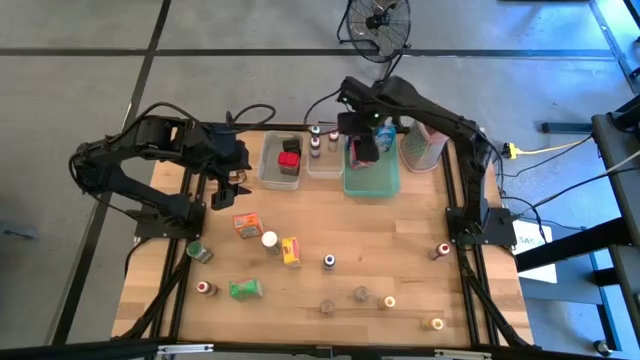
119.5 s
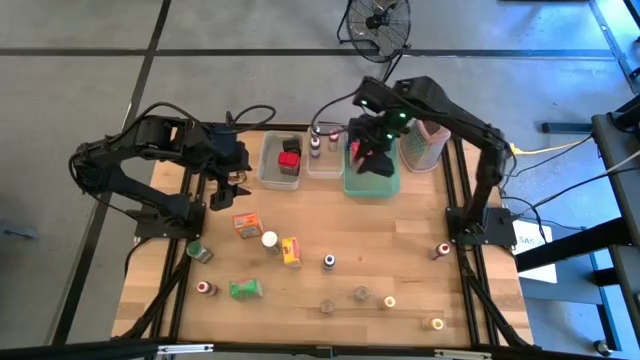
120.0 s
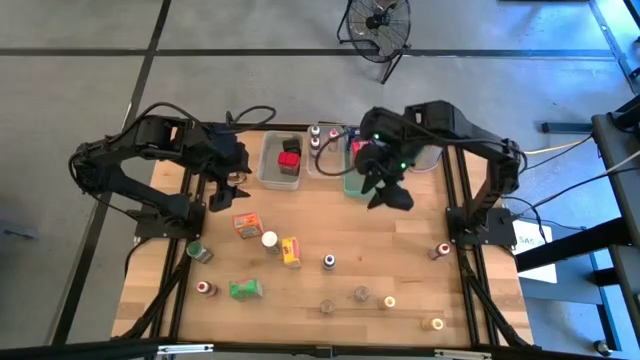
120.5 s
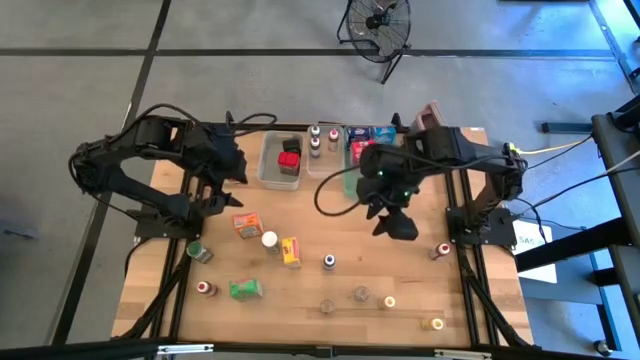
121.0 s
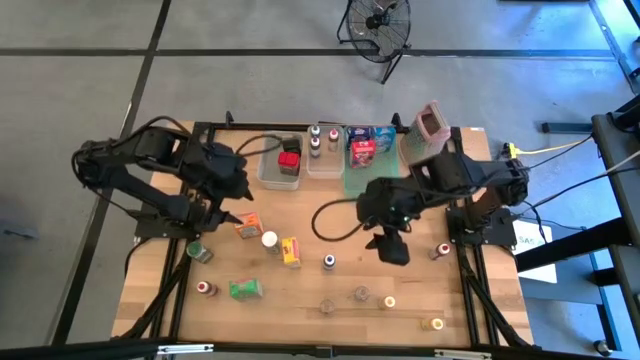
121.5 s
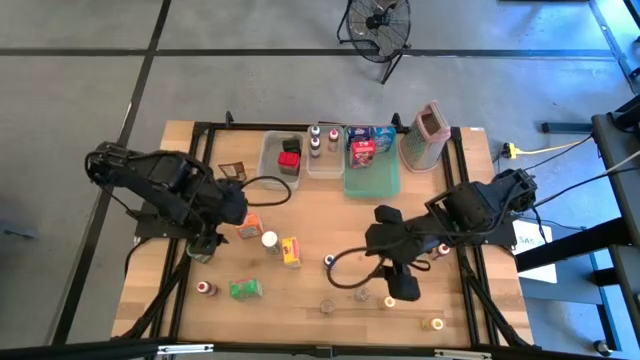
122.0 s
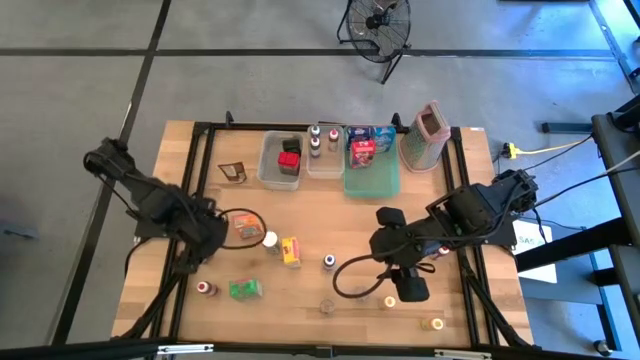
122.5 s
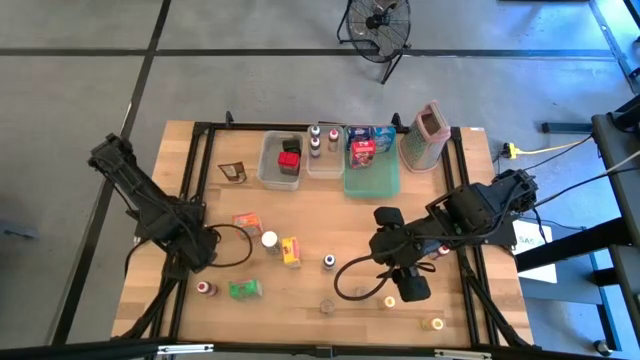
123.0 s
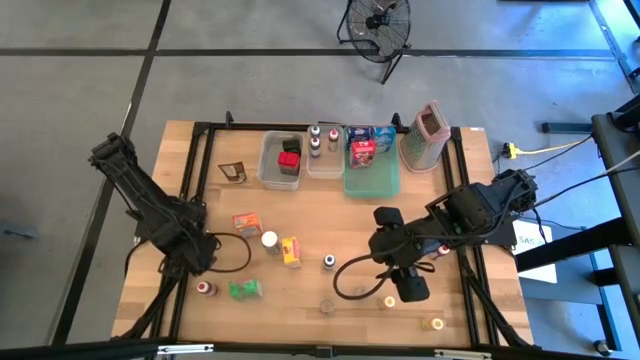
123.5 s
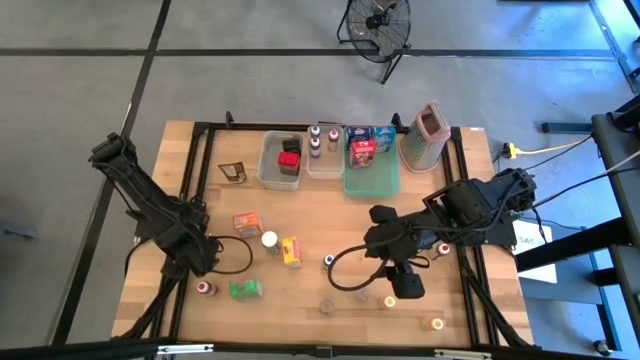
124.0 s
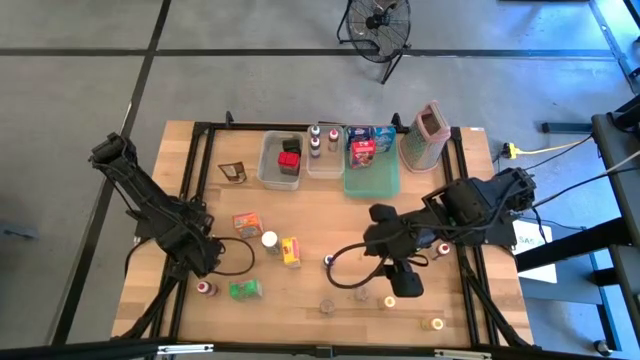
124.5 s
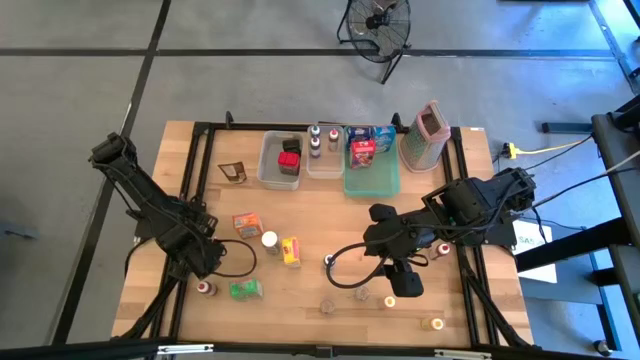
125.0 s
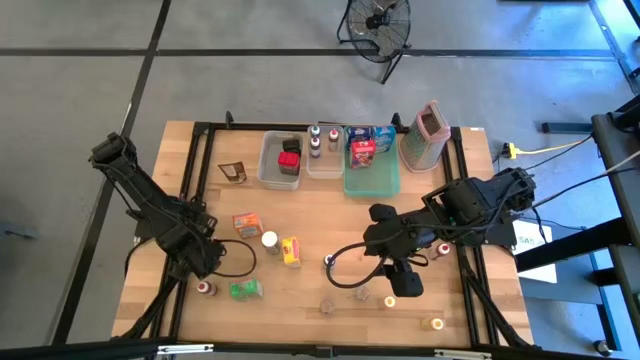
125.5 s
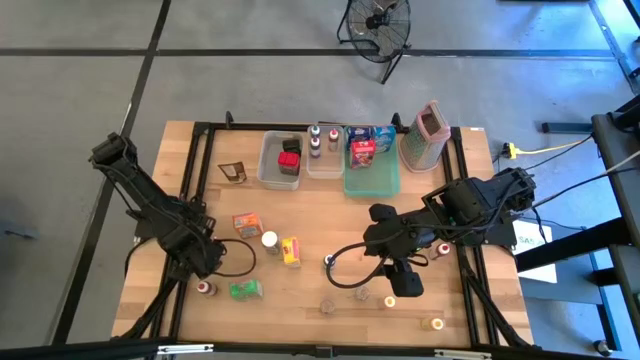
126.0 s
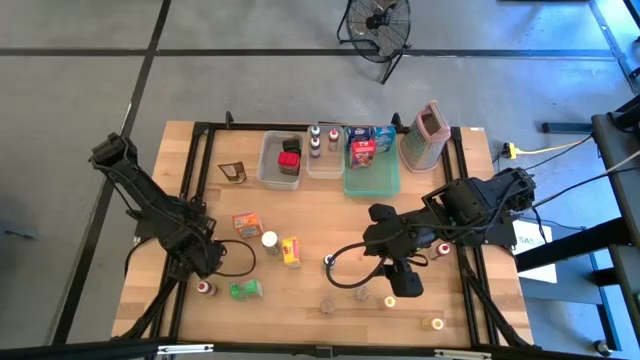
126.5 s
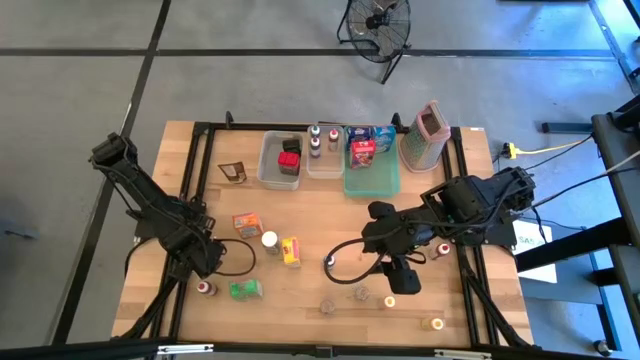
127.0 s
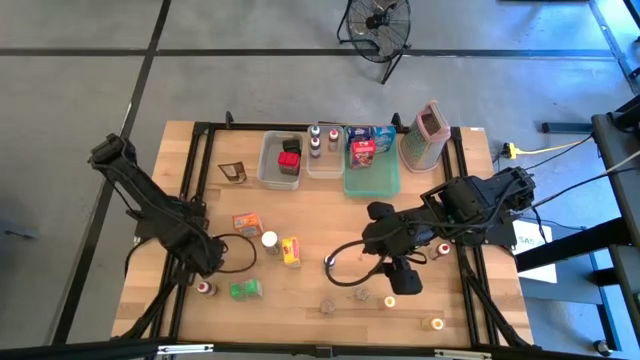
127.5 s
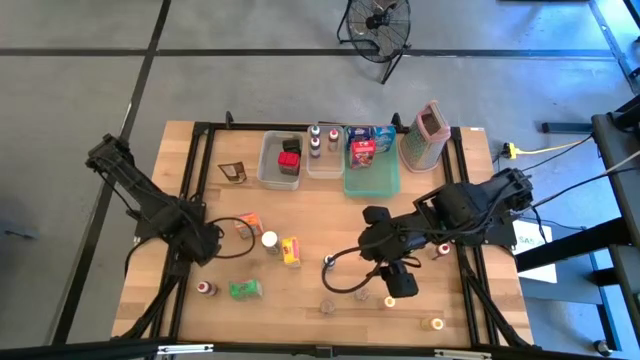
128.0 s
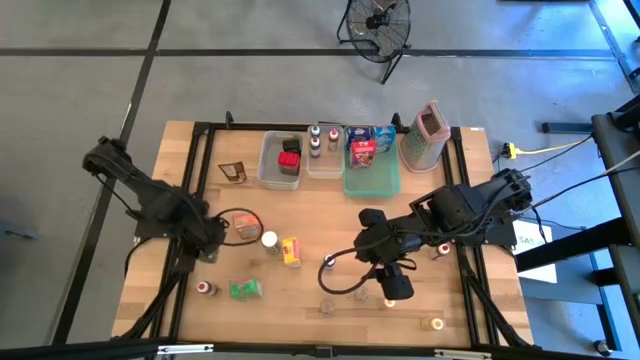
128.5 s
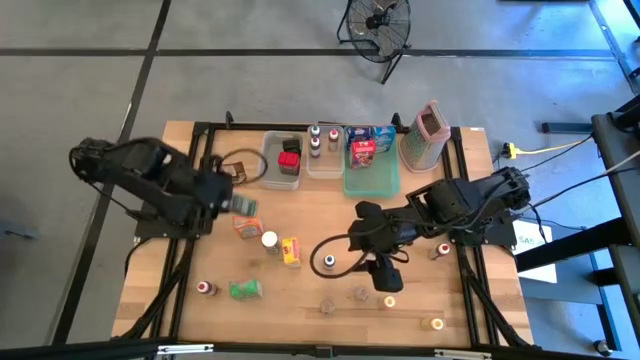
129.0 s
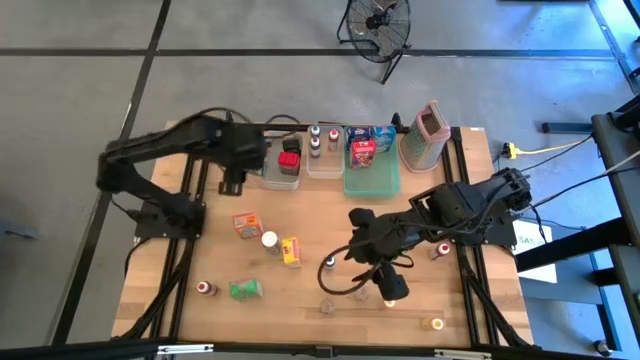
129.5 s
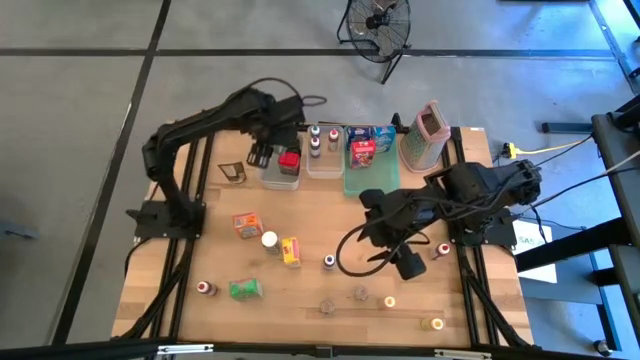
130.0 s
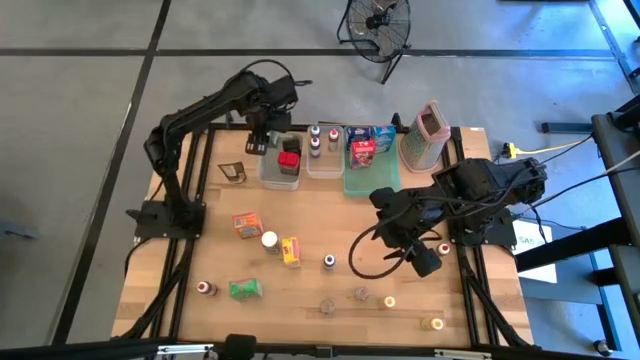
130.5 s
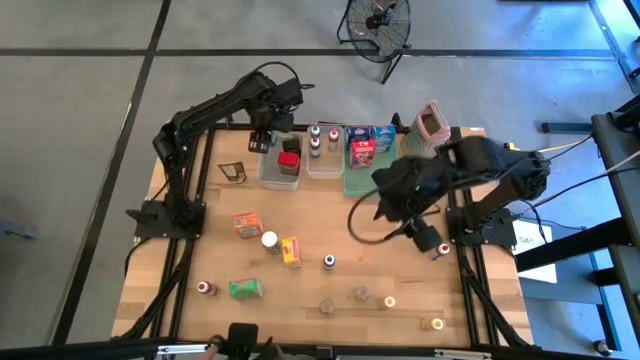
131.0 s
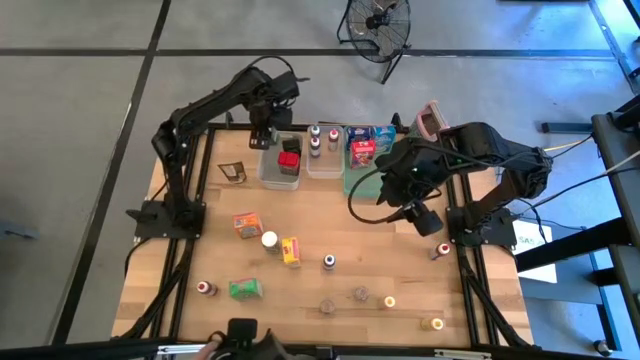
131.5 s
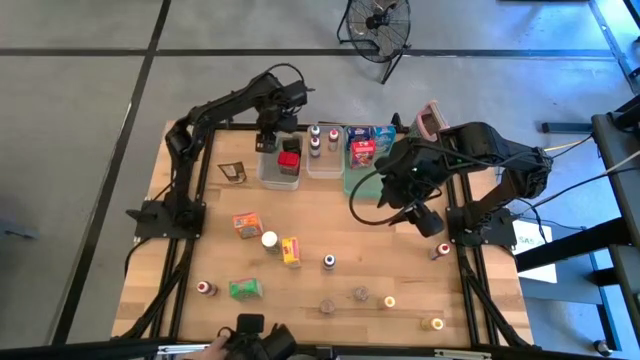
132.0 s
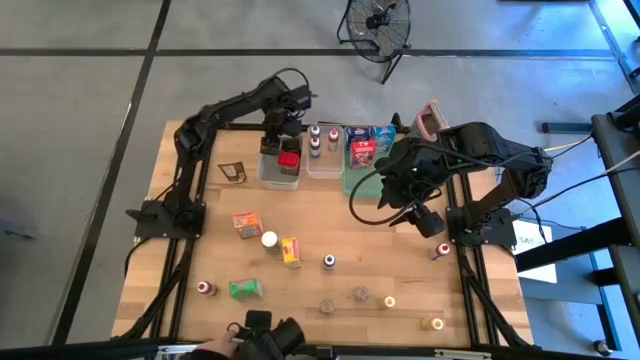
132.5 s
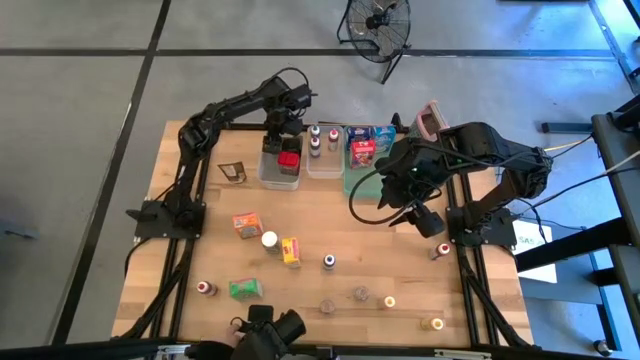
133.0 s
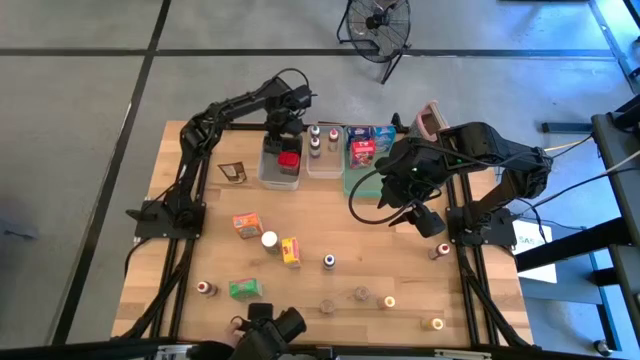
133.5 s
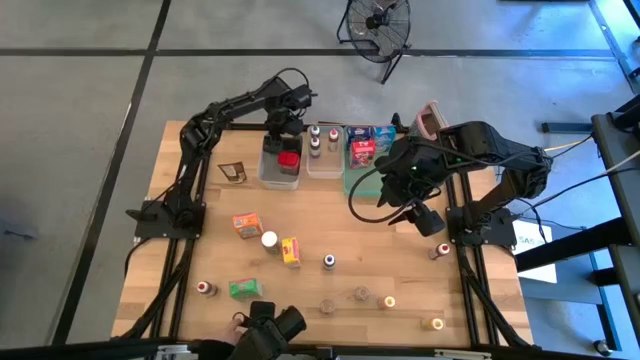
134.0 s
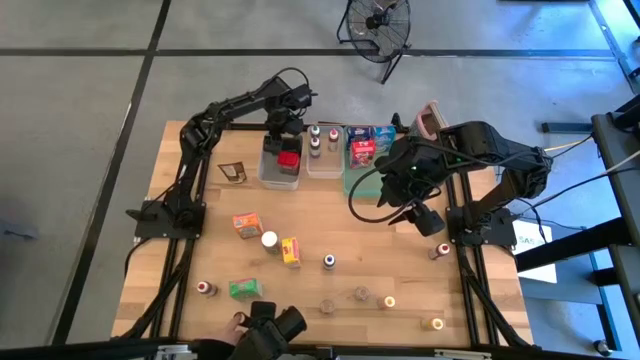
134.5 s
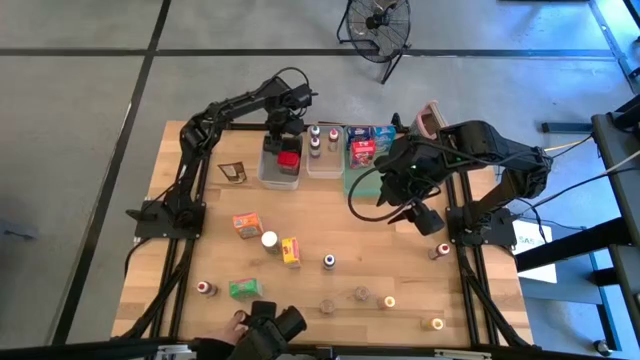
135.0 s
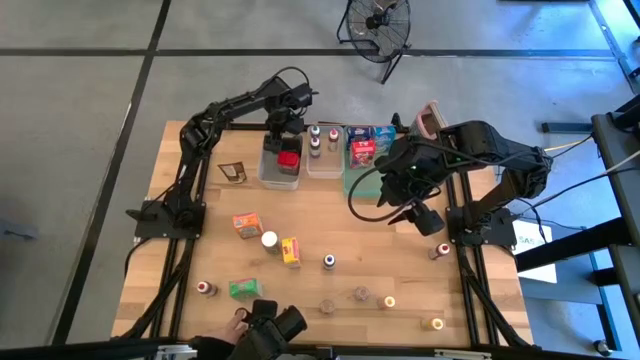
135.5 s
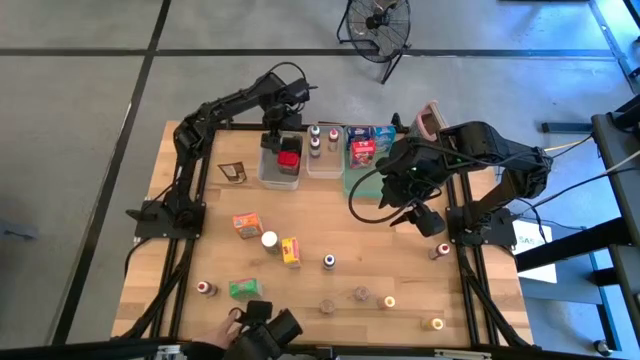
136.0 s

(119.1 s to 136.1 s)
Task: Pick & Place Kitchen Items
Put the green seasoning bottle into the gray bin

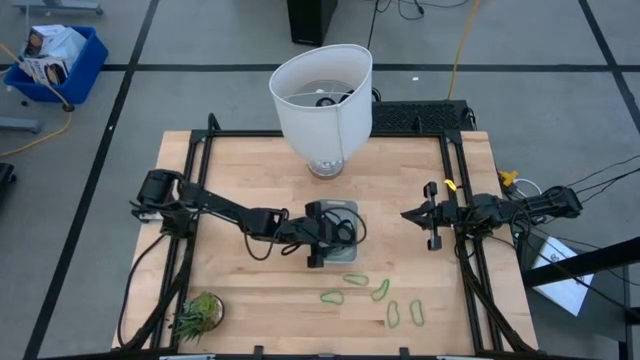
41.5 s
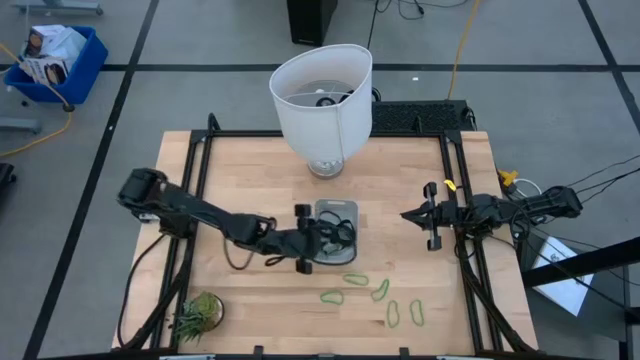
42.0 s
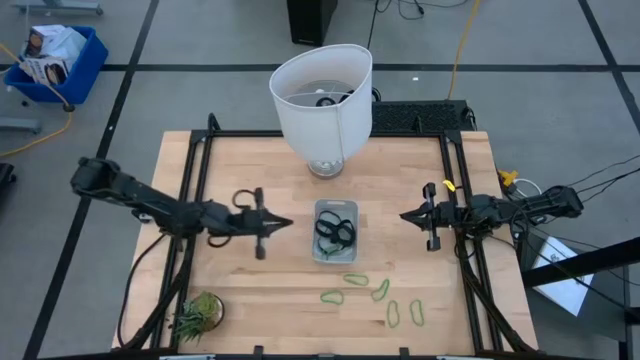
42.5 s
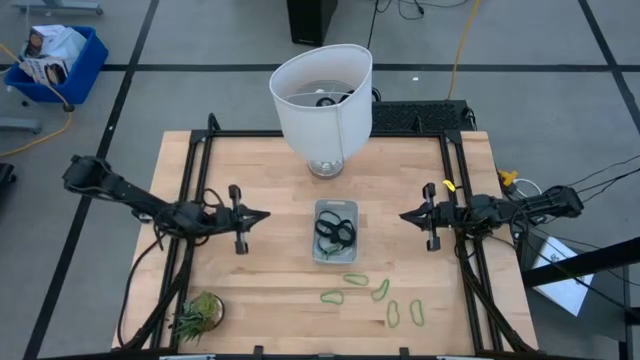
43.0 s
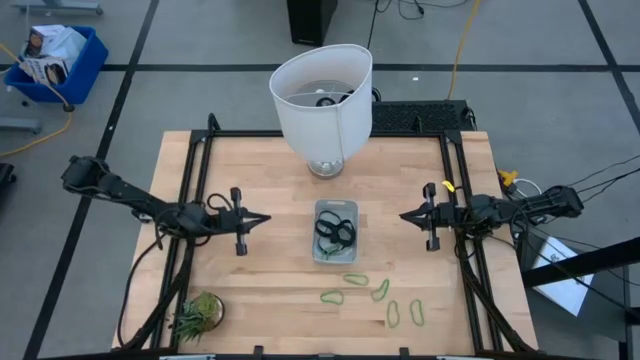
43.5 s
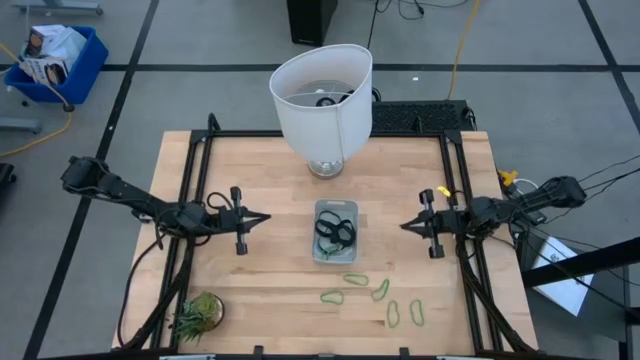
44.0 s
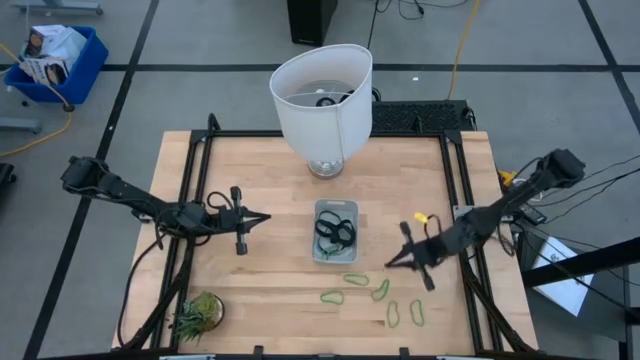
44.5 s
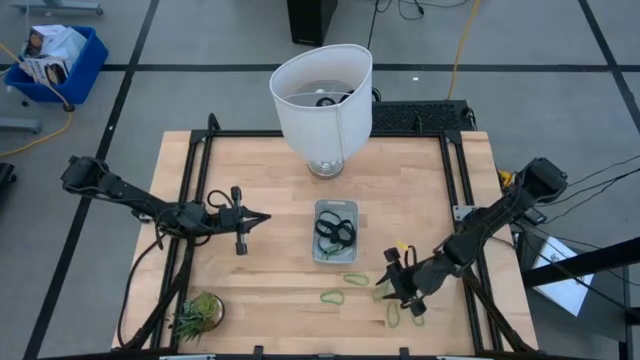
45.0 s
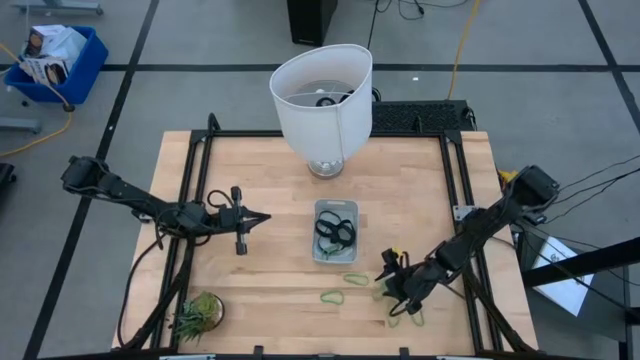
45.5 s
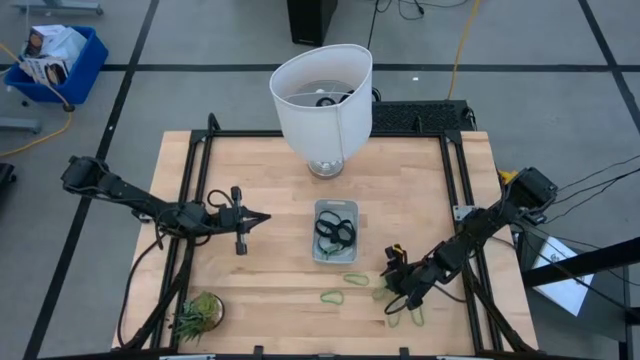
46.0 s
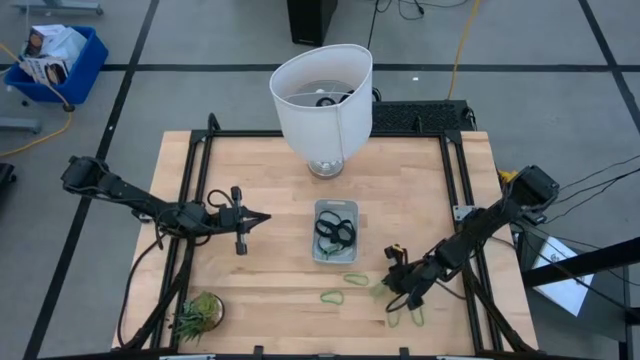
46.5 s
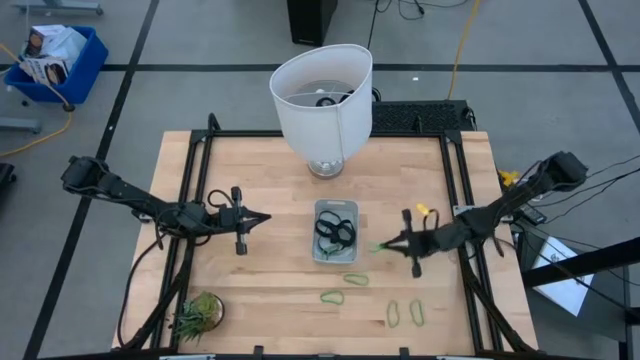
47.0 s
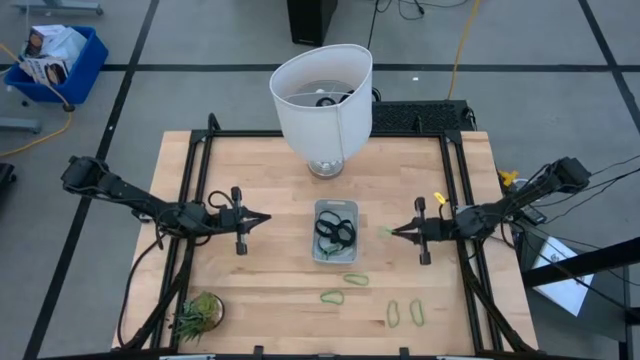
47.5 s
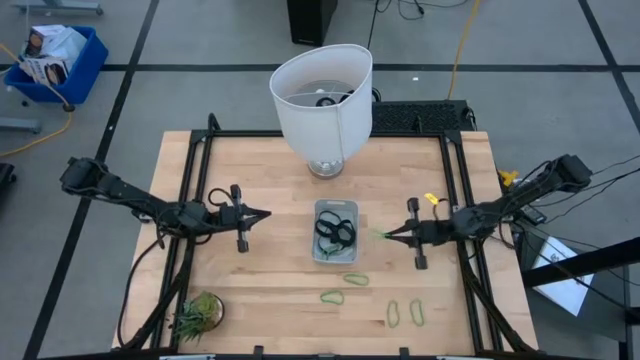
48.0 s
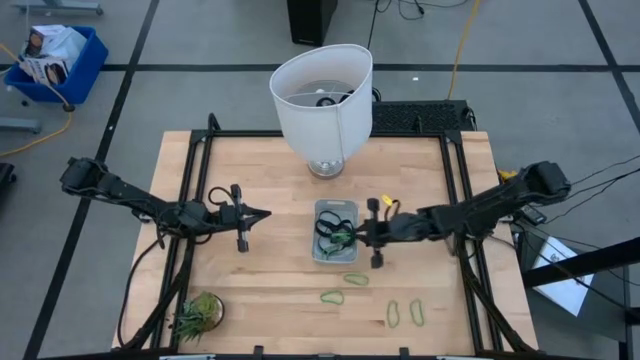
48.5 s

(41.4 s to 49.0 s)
Task: Pick and place rubber bands into bin
Put the green rubber band into the gray bin
